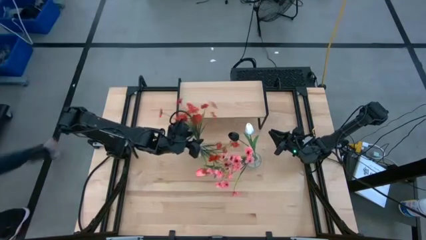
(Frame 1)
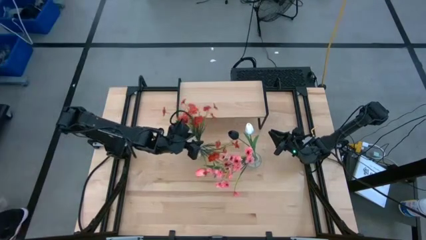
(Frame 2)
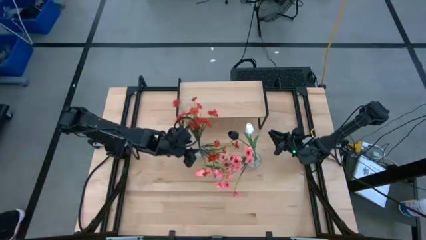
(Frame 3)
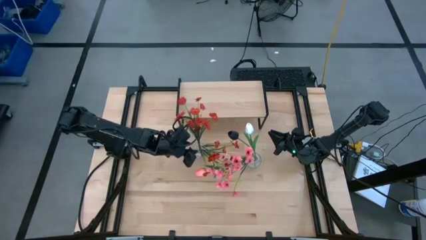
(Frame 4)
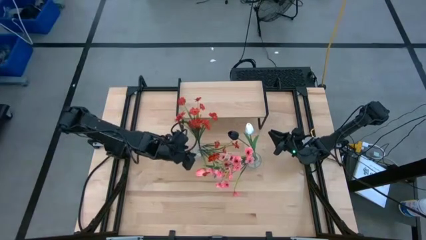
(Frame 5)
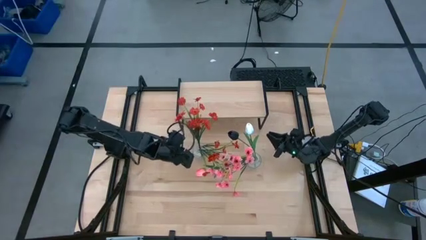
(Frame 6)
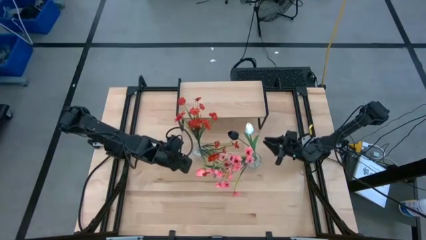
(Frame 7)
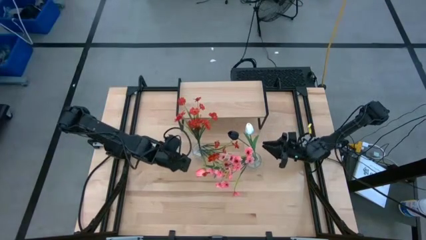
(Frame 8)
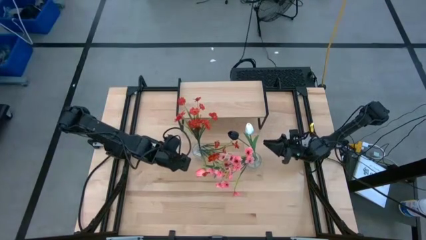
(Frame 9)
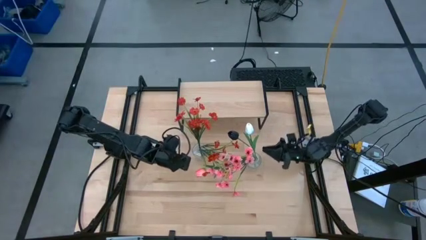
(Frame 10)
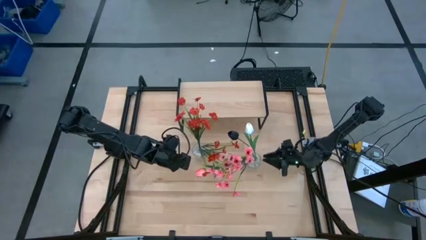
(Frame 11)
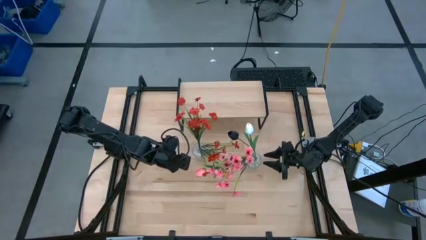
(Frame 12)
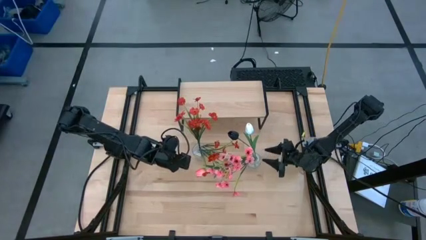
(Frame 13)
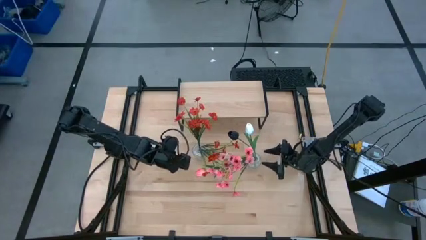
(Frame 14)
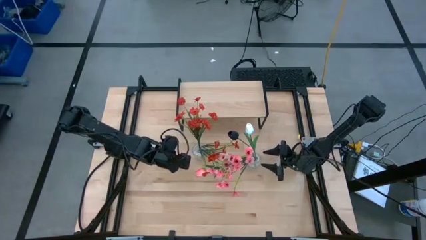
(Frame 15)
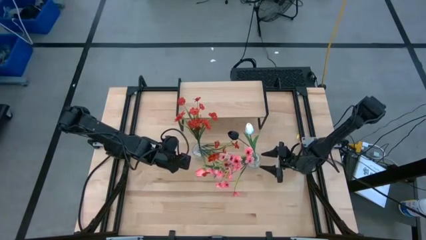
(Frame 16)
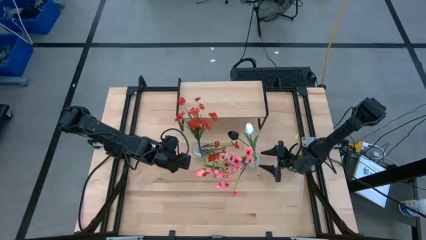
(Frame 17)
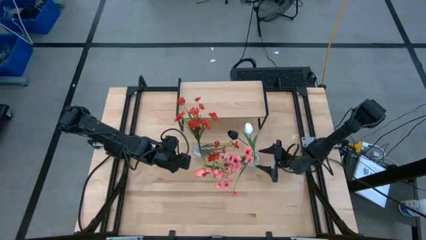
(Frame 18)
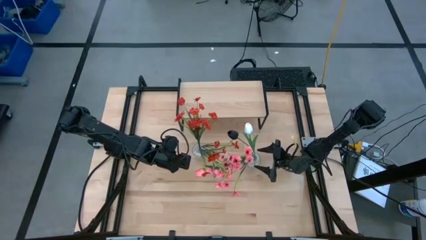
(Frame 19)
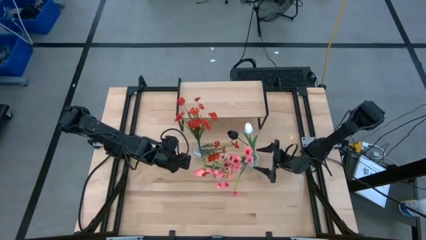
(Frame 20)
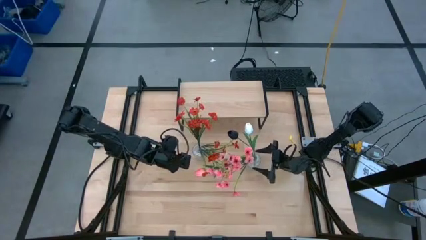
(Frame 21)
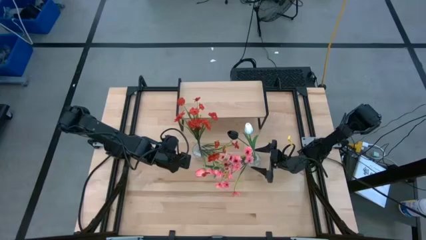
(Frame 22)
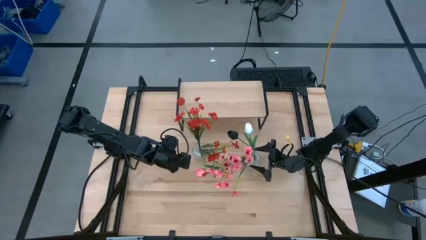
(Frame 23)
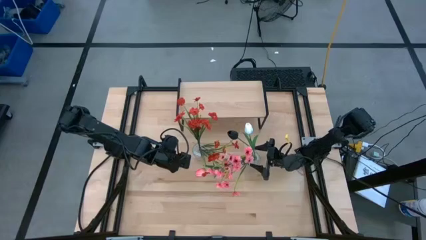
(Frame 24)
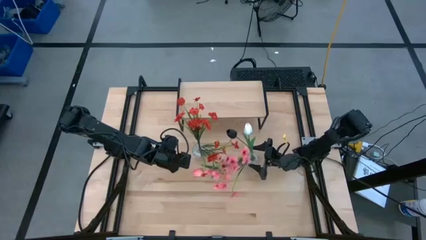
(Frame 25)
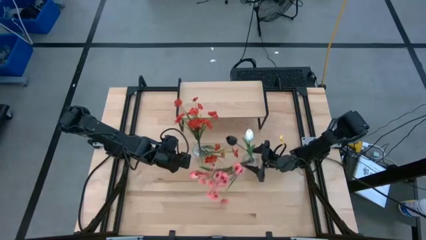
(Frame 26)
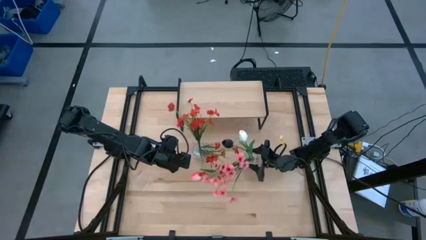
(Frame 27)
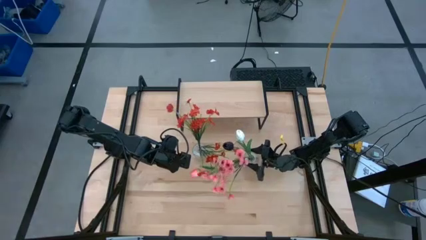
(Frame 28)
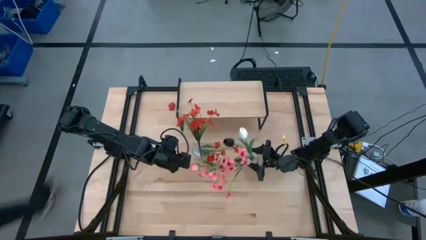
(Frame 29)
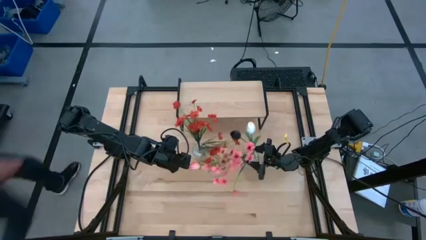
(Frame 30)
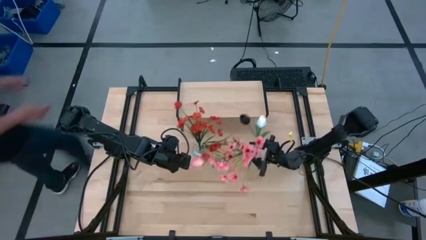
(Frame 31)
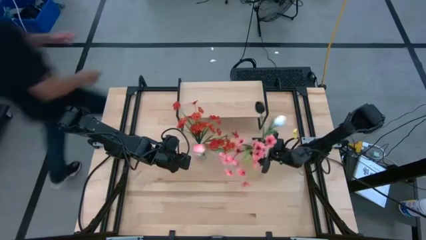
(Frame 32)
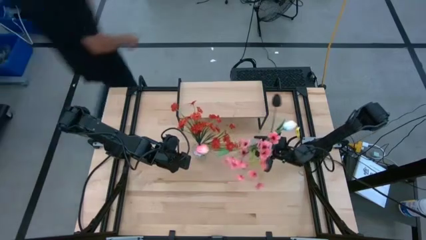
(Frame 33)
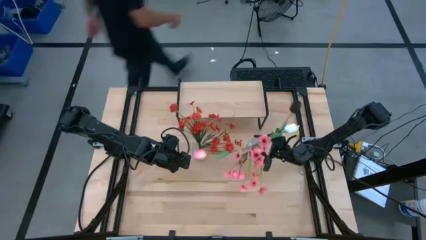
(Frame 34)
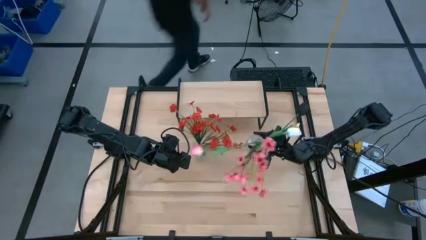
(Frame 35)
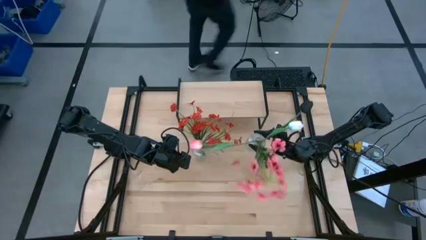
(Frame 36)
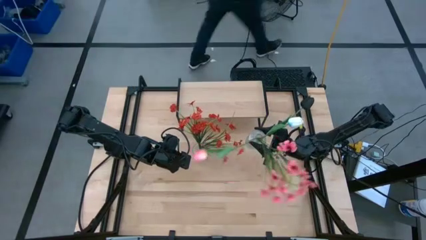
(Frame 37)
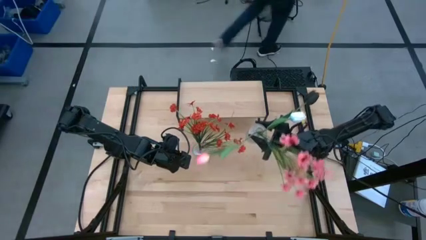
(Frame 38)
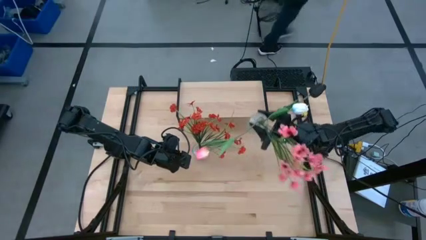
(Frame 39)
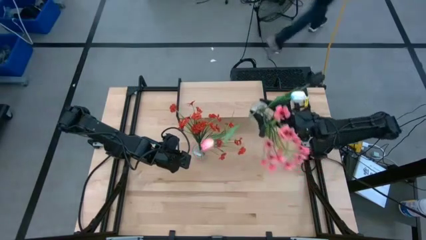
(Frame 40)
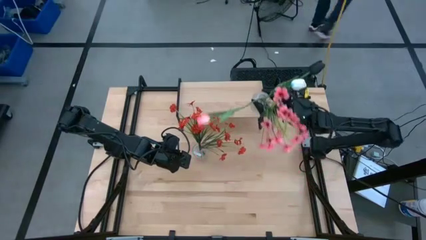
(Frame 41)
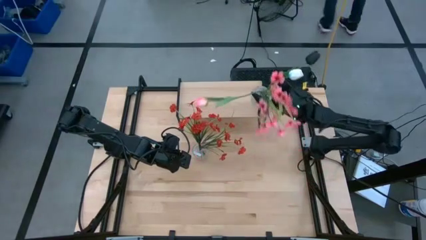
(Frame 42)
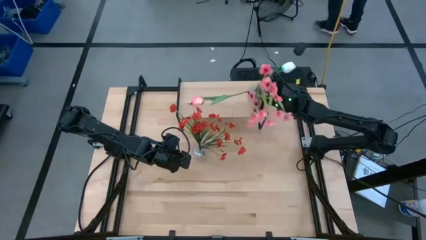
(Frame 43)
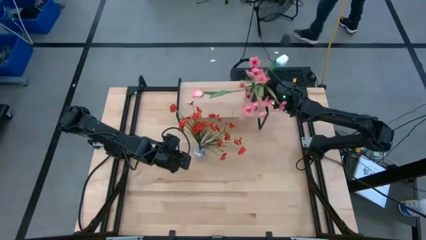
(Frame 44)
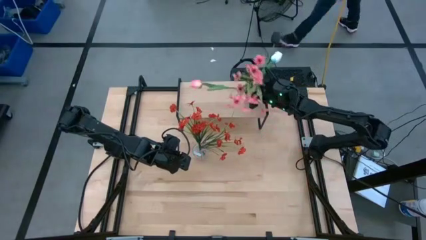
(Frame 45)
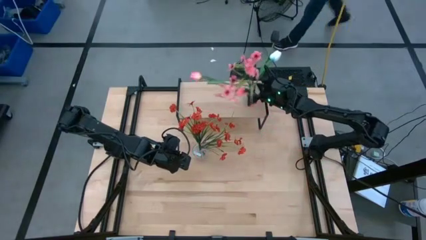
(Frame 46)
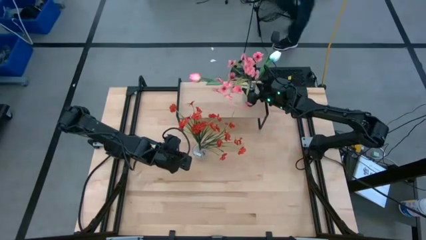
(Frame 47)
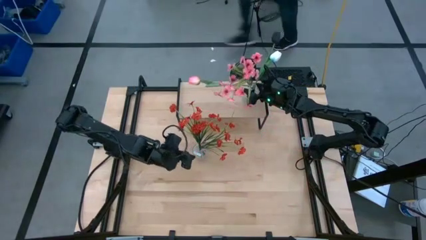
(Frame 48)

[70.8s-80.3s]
Task: Pick and place flowers into a vace then onto a shelf
Put the right transparent vase on the shelf

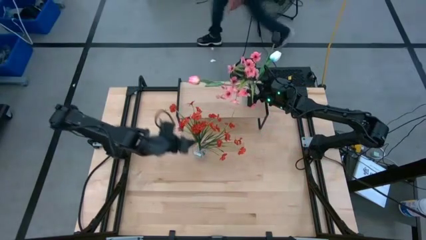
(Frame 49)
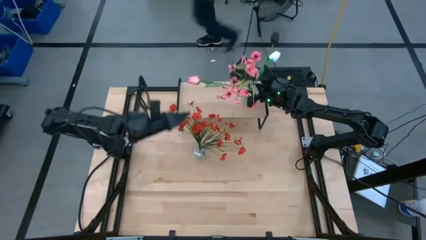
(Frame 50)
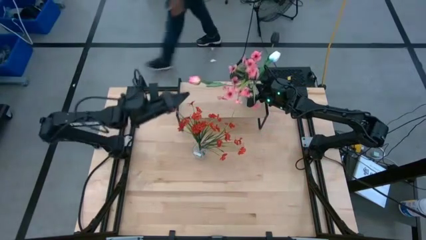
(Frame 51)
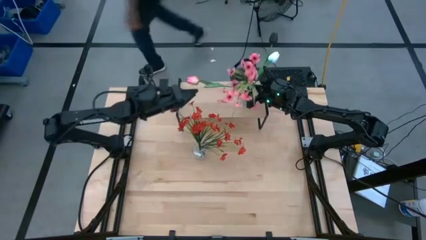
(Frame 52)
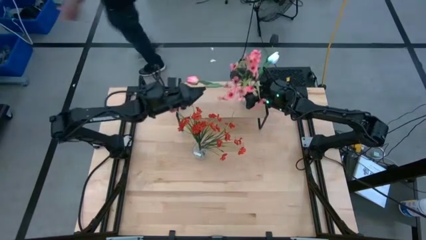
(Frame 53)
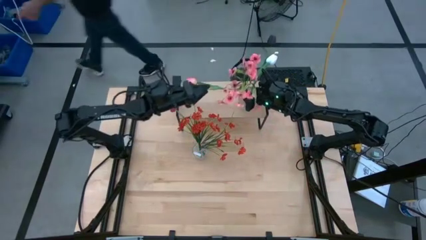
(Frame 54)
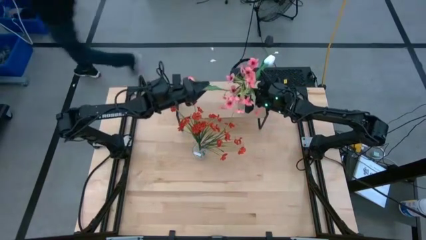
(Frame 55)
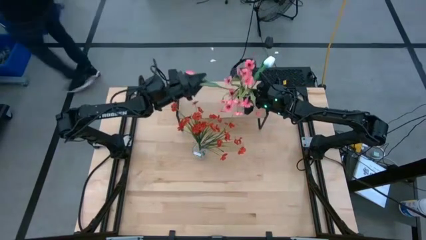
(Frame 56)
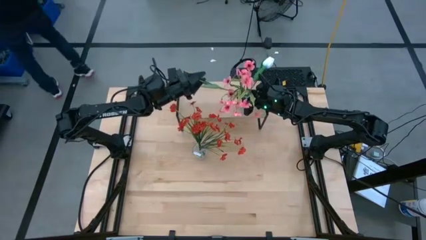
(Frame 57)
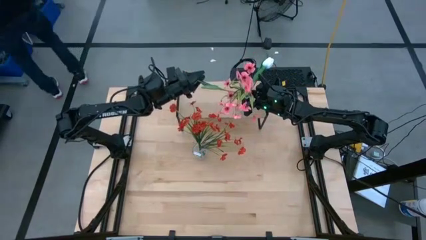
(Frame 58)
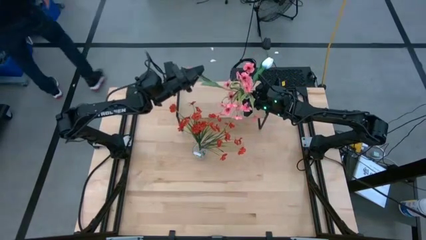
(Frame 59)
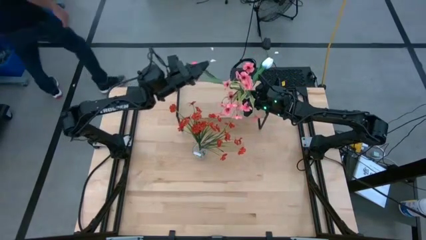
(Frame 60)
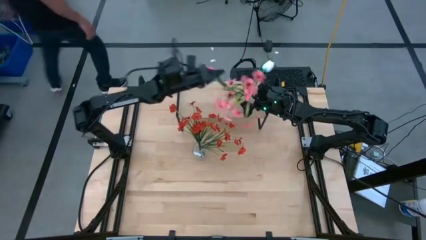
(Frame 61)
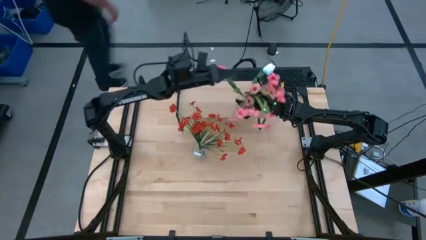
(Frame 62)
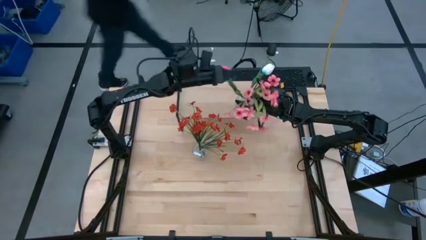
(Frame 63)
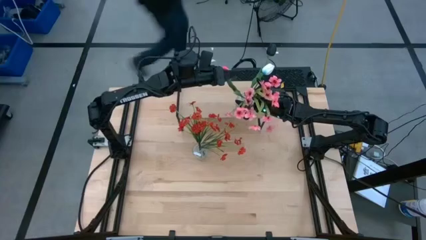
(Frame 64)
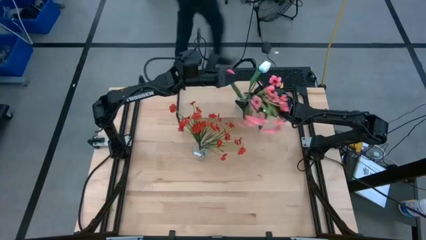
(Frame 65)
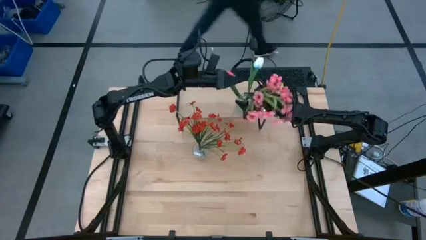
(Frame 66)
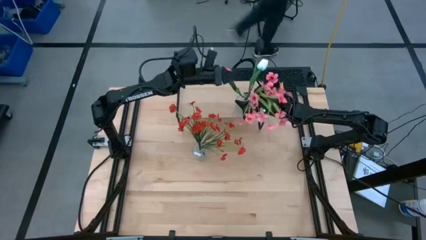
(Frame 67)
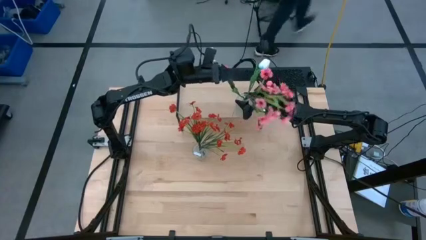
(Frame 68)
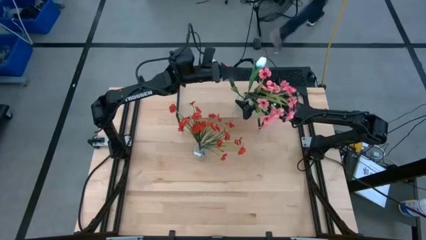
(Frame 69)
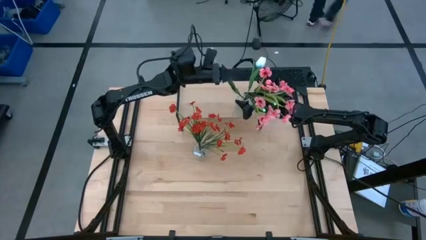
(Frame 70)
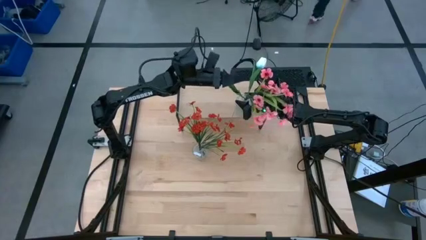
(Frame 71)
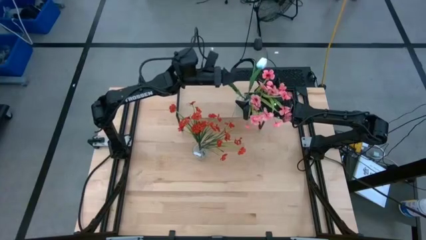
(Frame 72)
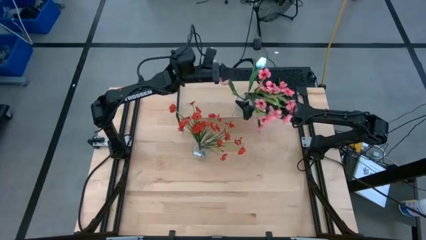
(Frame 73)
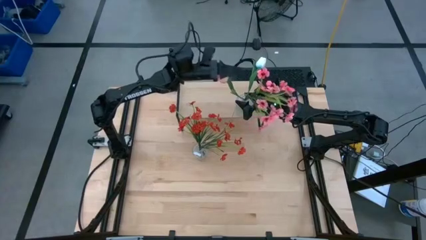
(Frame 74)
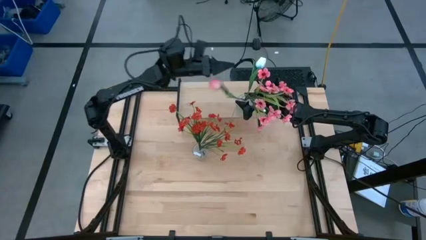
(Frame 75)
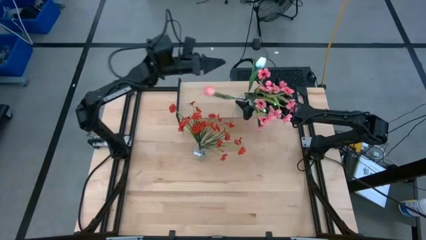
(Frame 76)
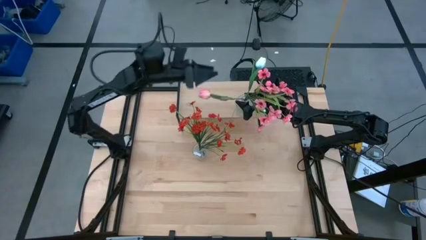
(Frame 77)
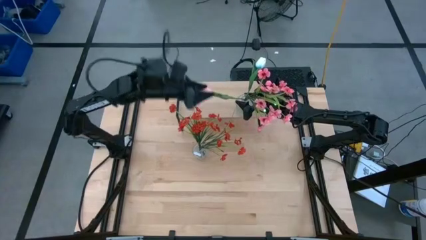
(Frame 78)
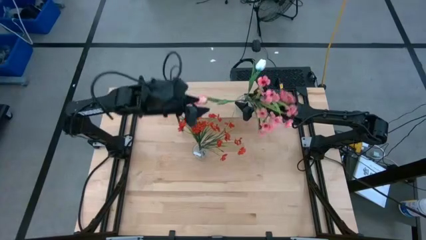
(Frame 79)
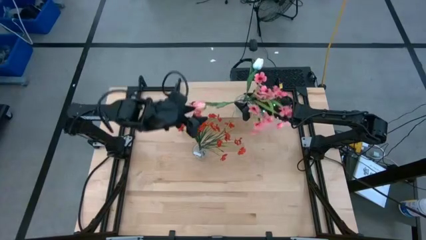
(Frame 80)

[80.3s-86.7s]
Adjust the pink tulip in the transparent vase on the shelf
